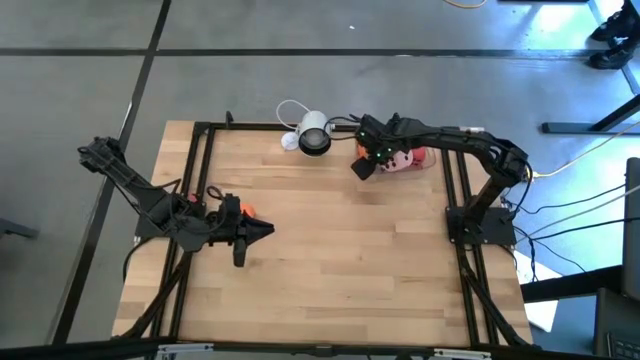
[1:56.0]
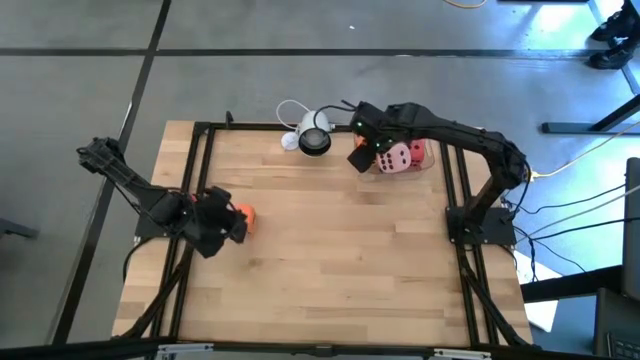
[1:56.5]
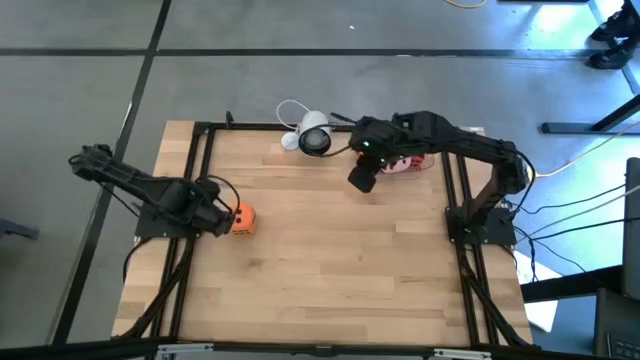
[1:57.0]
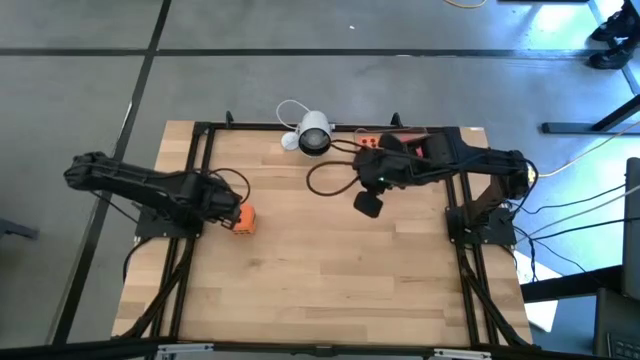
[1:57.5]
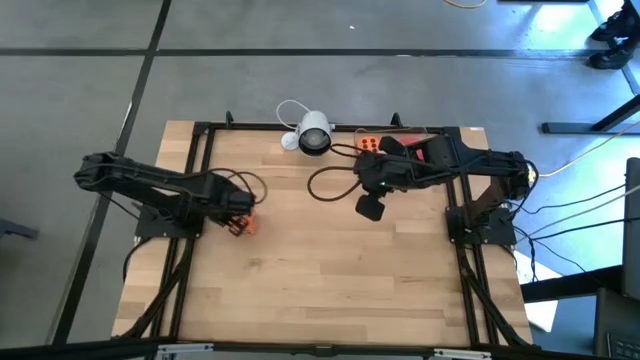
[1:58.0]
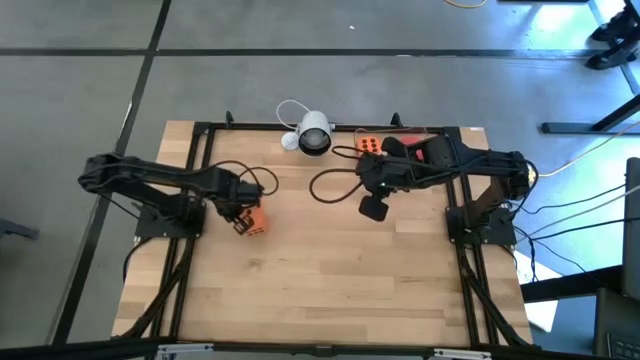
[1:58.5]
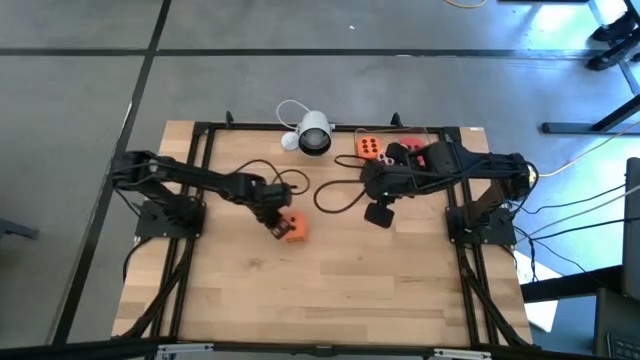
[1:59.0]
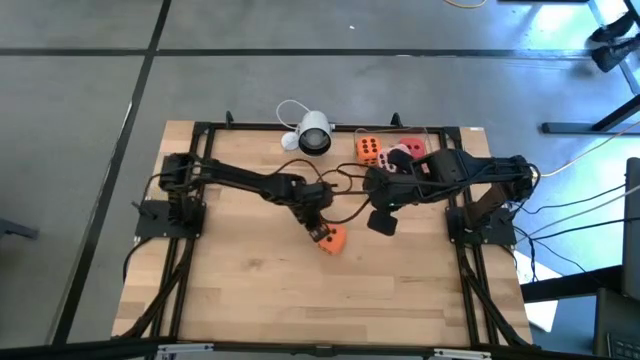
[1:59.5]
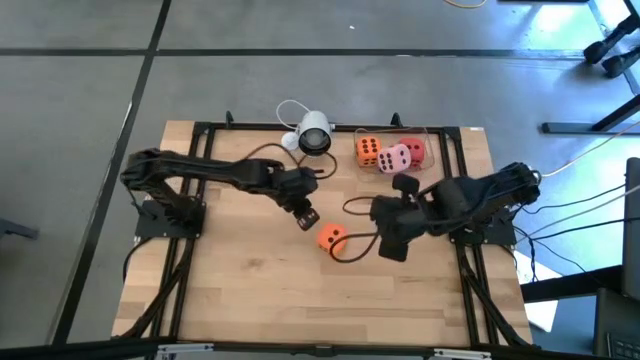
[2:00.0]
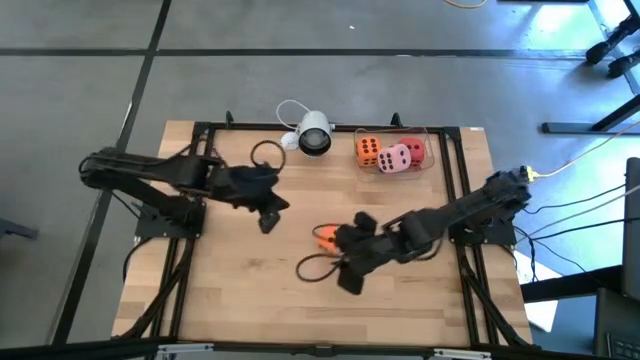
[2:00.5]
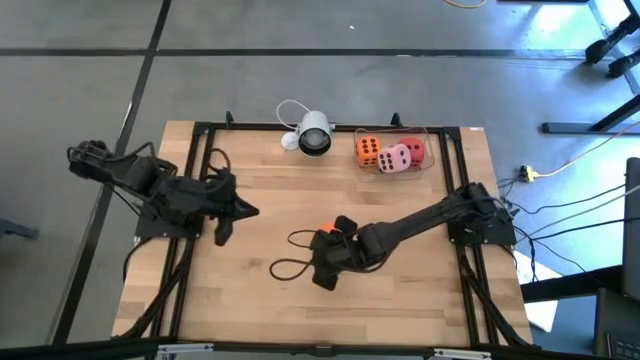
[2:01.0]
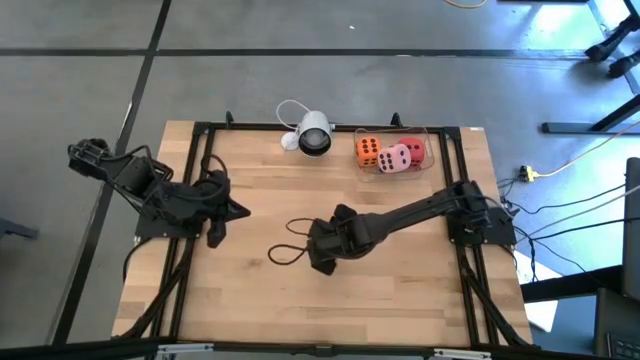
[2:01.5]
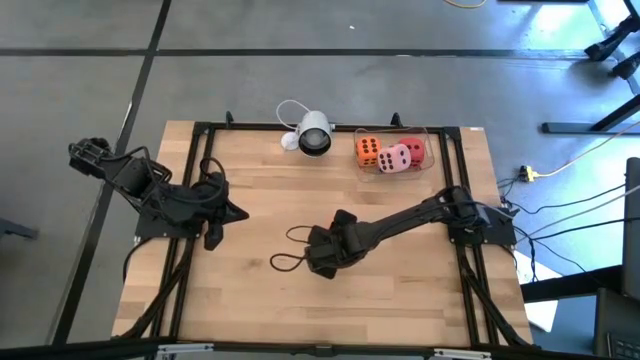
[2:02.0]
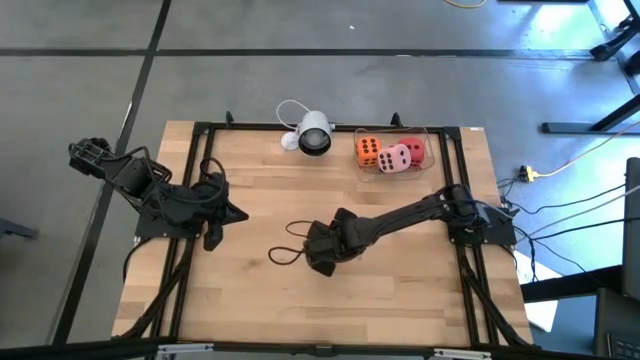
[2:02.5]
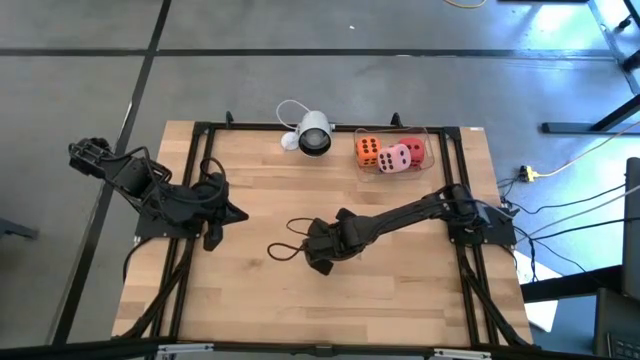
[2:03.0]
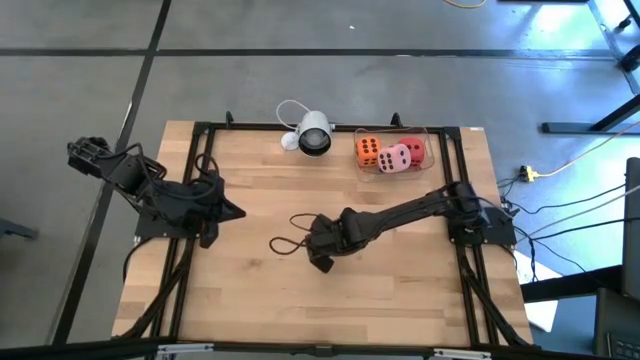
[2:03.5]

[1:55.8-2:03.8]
Task: Pick & Place Dice
Put the large orange dice into the transparent container

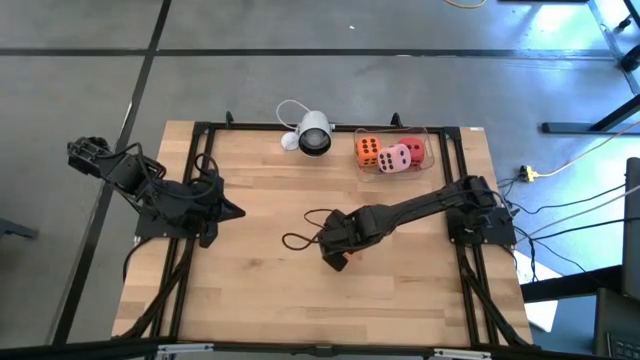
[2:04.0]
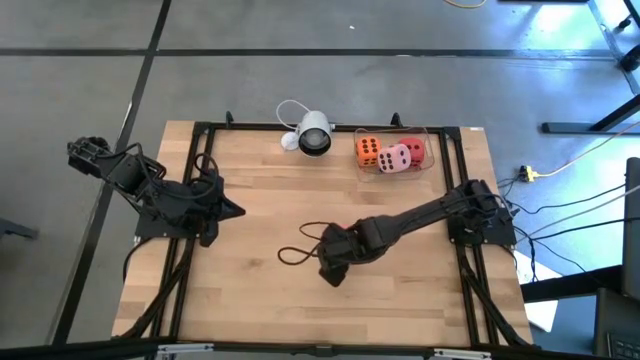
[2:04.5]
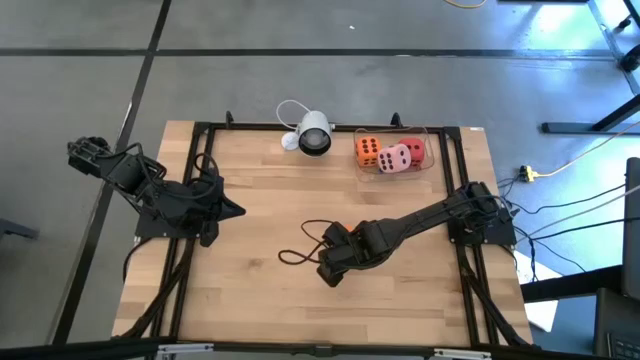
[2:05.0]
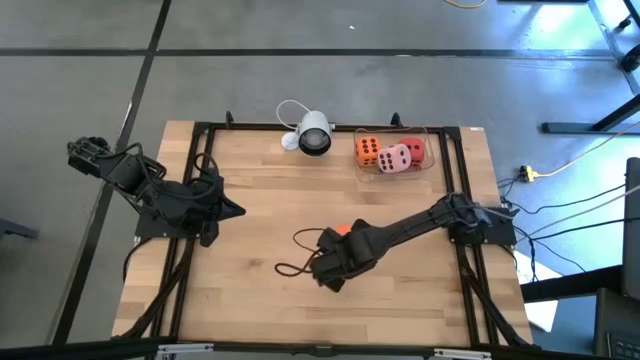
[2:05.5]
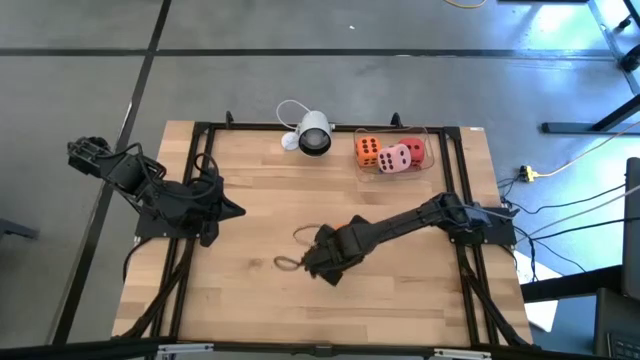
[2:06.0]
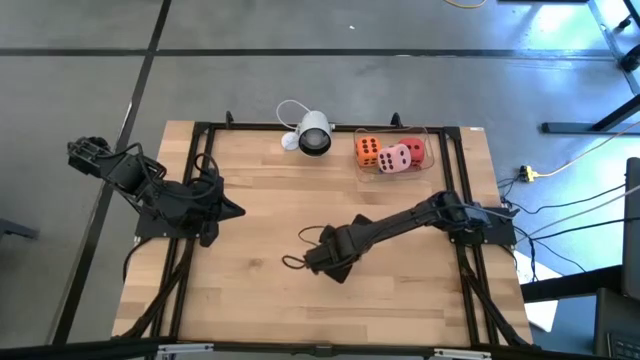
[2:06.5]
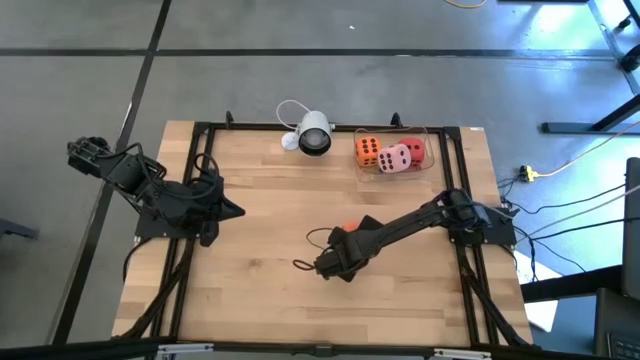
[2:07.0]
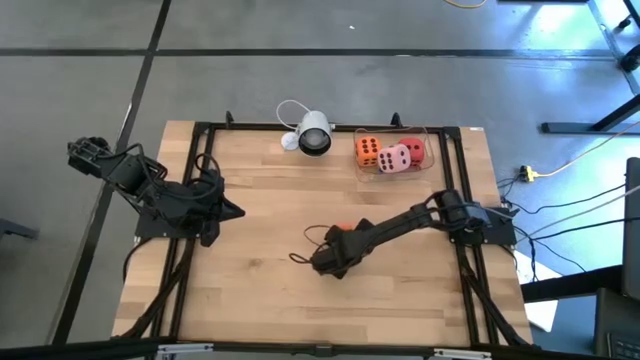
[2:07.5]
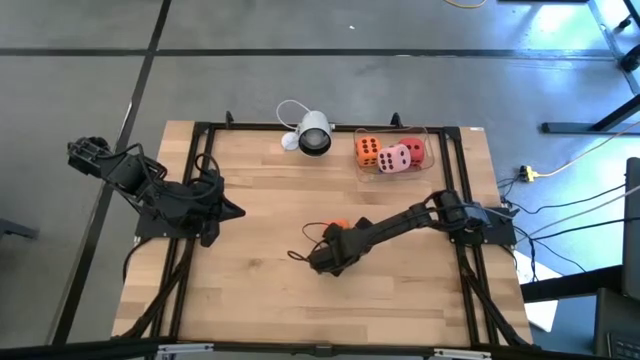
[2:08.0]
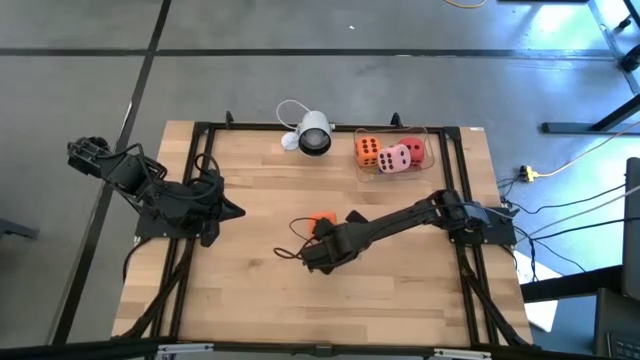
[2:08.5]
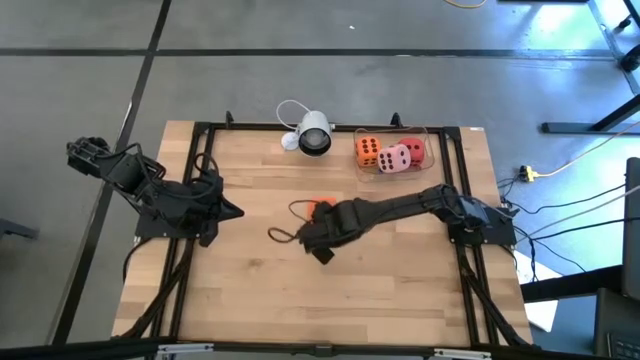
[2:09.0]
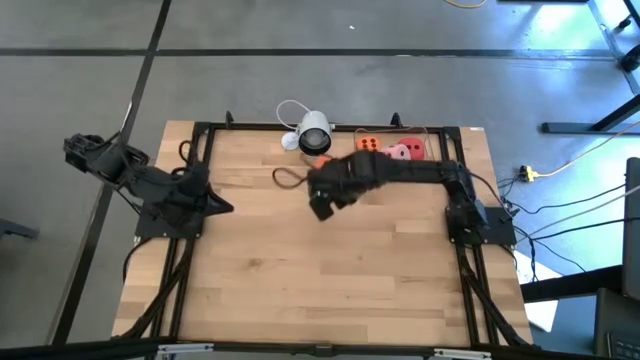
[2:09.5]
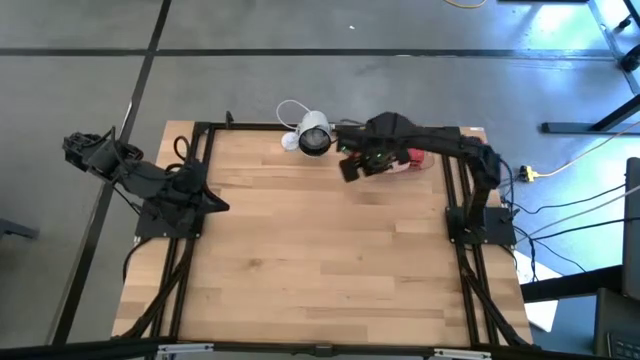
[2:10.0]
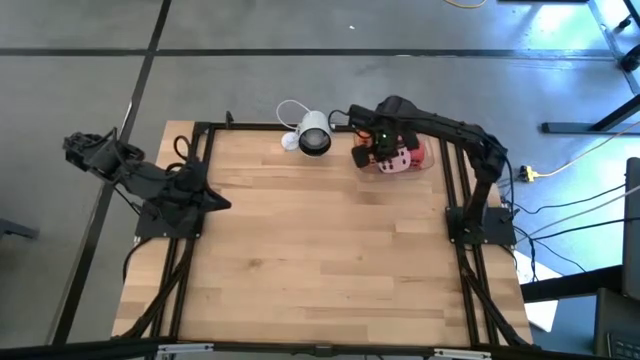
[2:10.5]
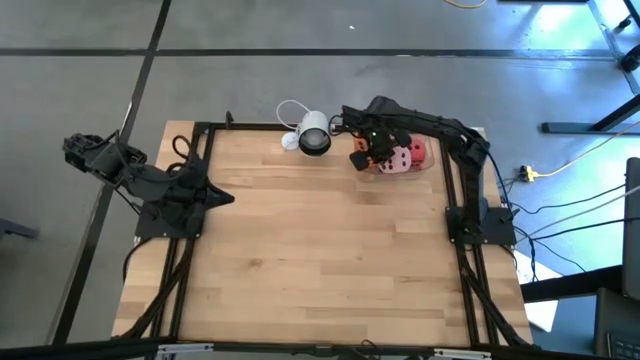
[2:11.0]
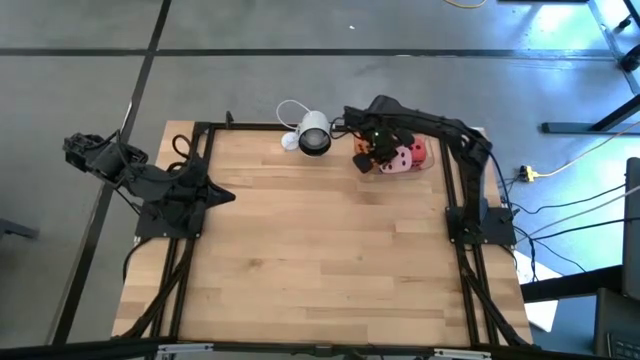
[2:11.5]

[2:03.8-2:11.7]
Put the large orange dice into the transparent container

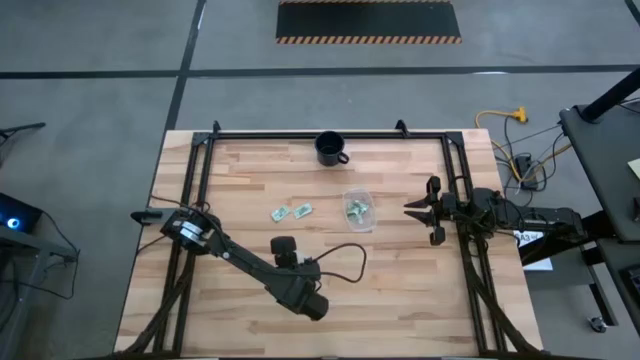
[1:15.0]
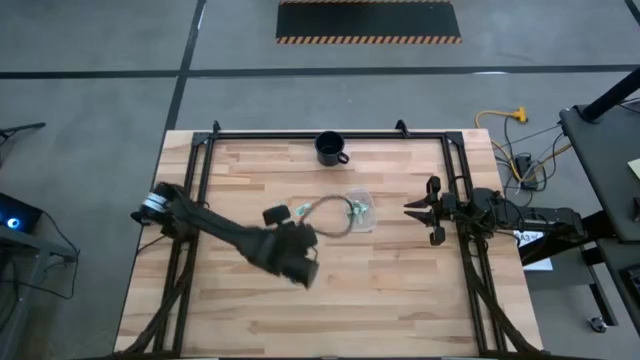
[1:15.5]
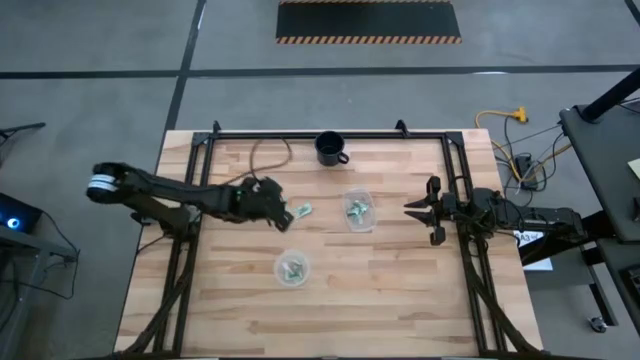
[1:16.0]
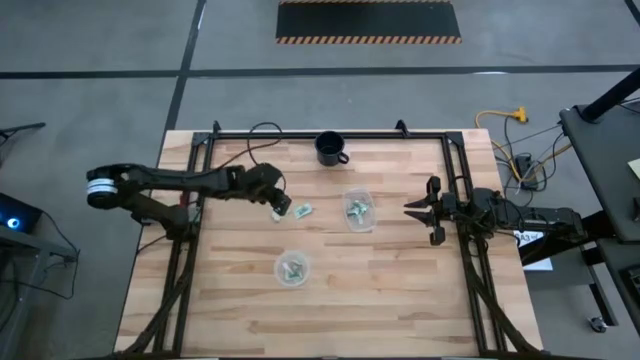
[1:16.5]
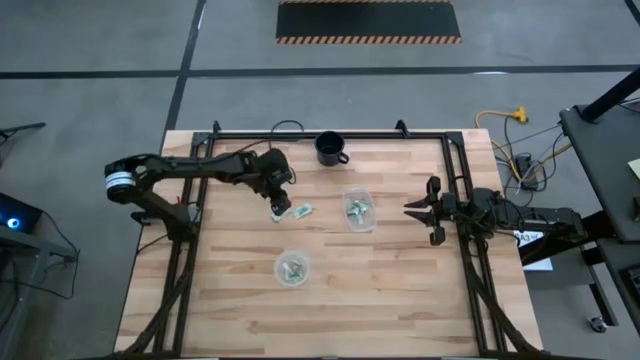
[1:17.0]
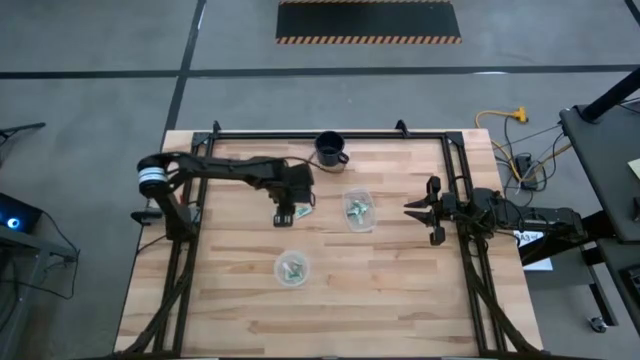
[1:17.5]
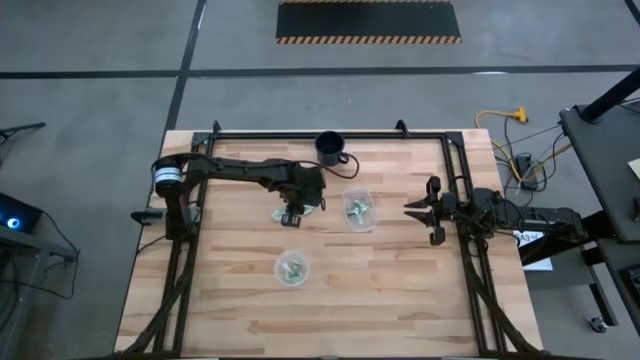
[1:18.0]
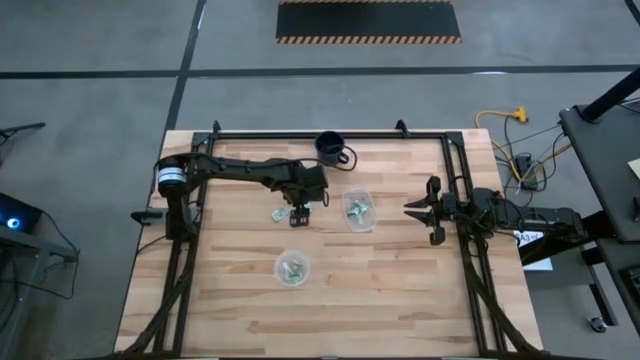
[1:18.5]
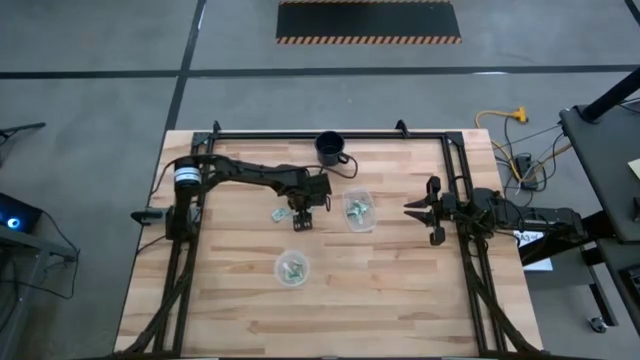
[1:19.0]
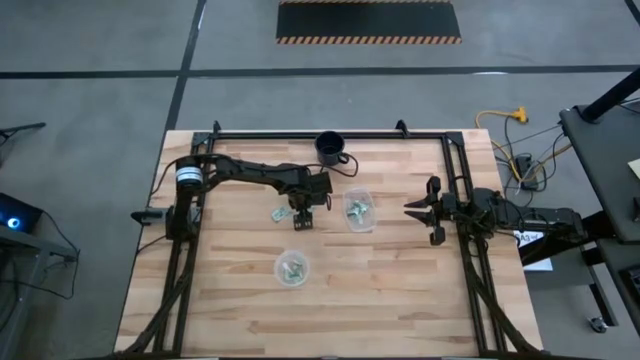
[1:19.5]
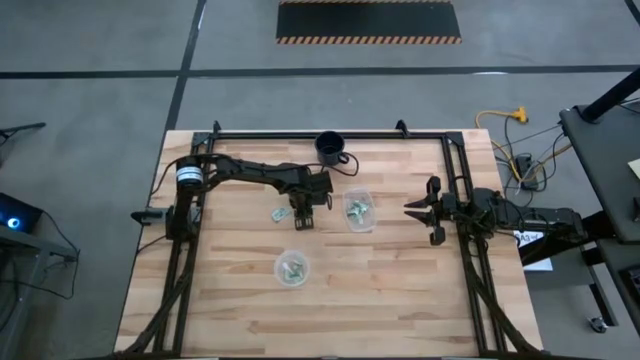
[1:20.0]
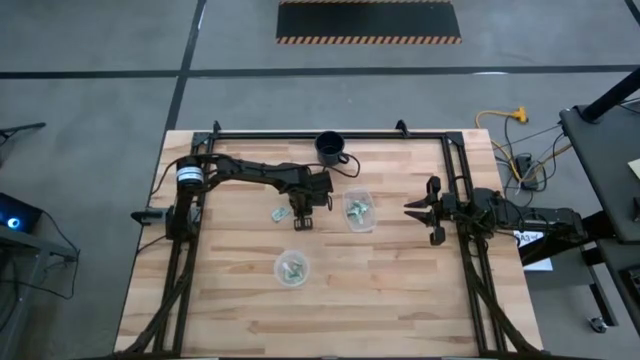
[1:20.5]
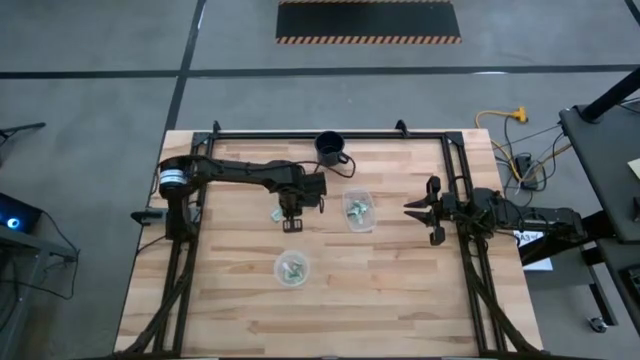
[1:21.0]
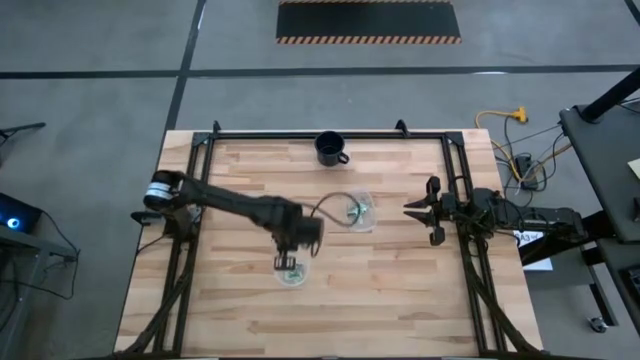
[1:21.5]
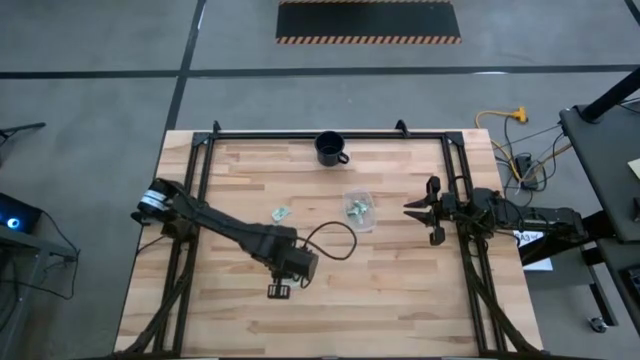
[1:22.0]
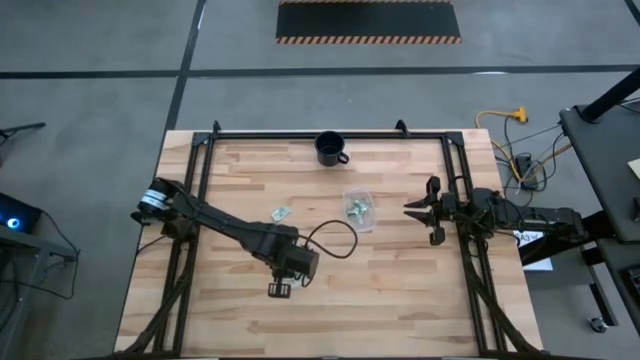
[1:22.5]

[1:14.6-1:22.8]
Task: Pick and place items into bin
Put the white stevia packet into the left transparent bin
